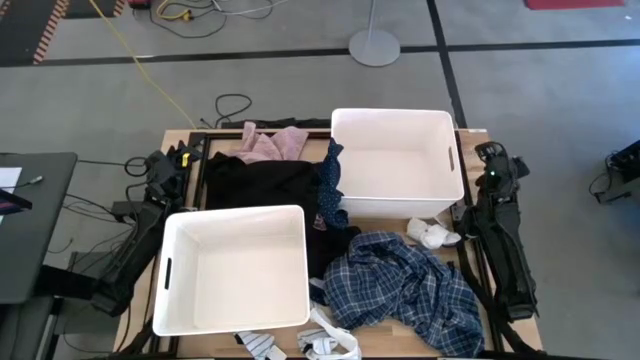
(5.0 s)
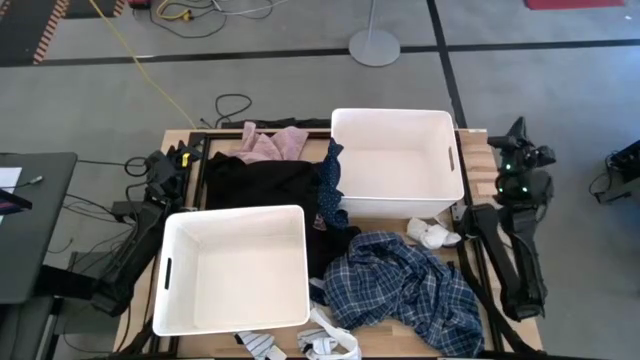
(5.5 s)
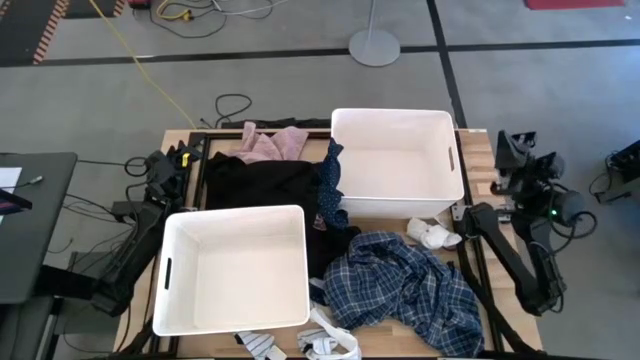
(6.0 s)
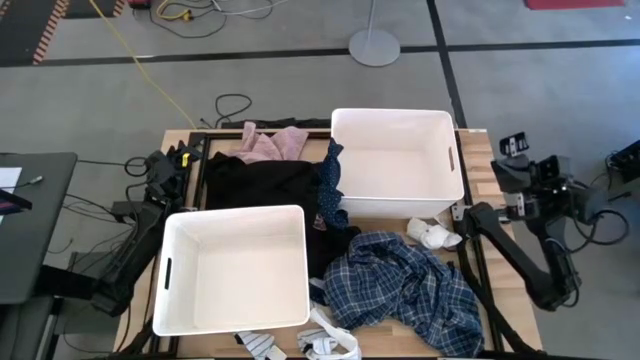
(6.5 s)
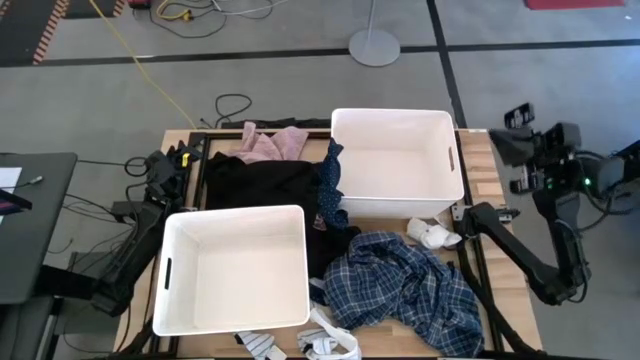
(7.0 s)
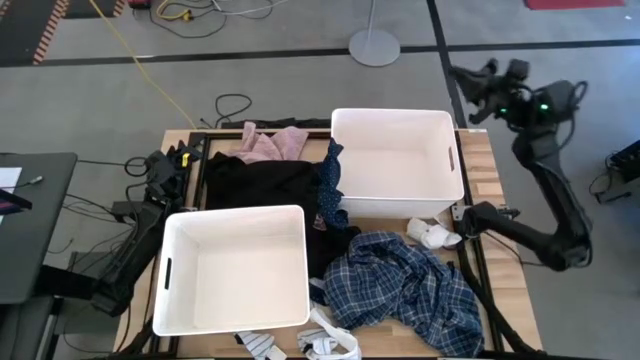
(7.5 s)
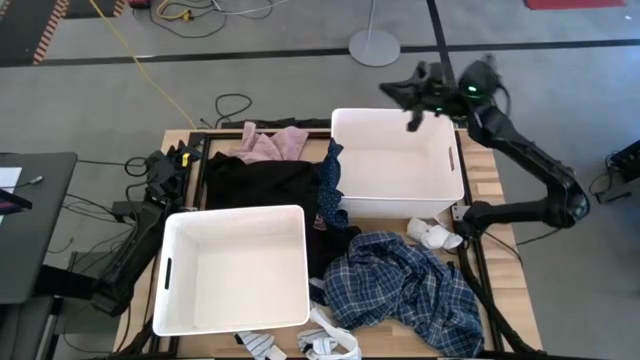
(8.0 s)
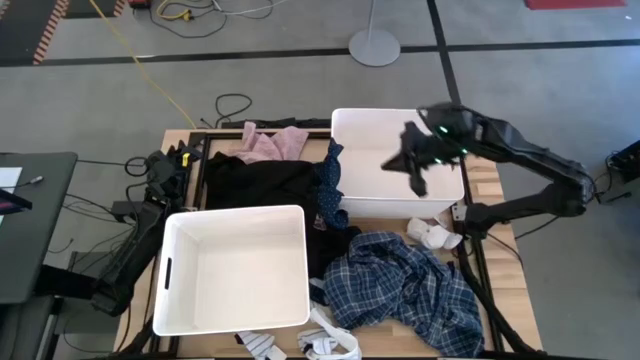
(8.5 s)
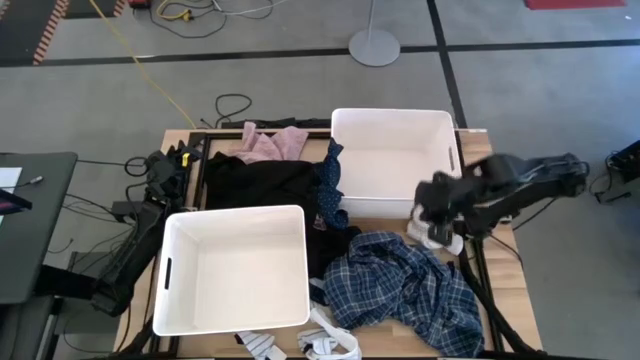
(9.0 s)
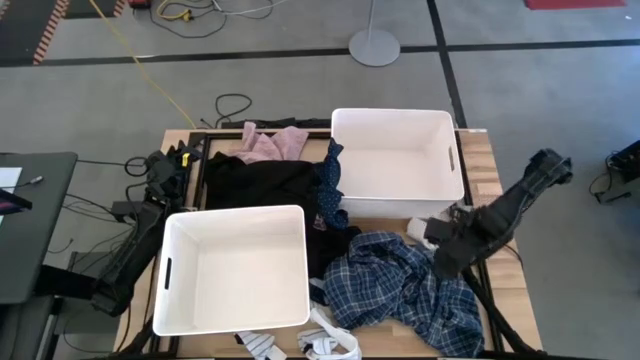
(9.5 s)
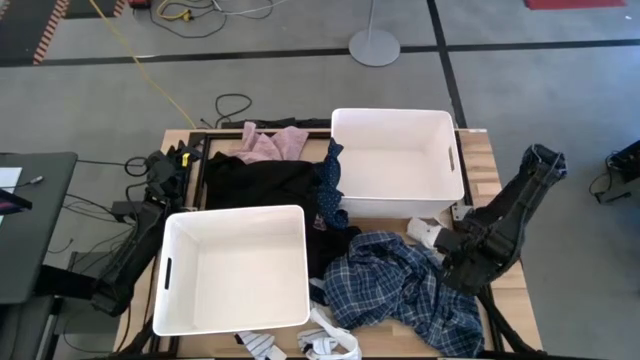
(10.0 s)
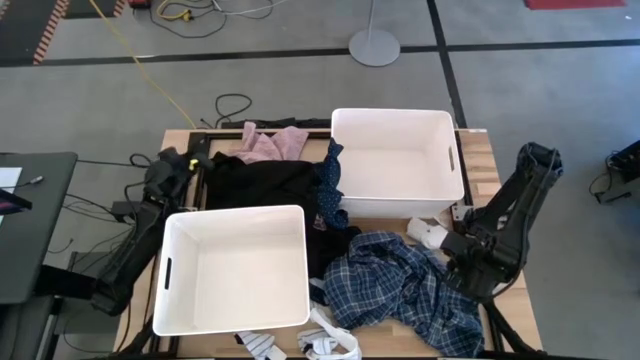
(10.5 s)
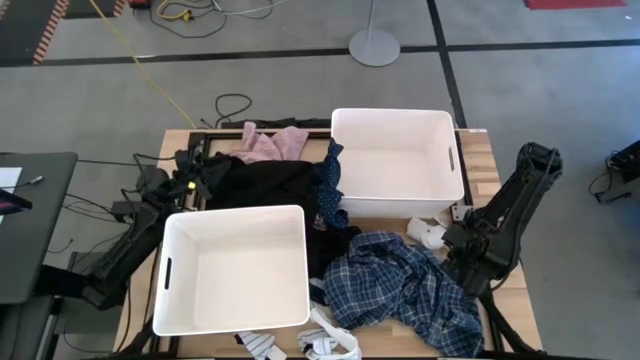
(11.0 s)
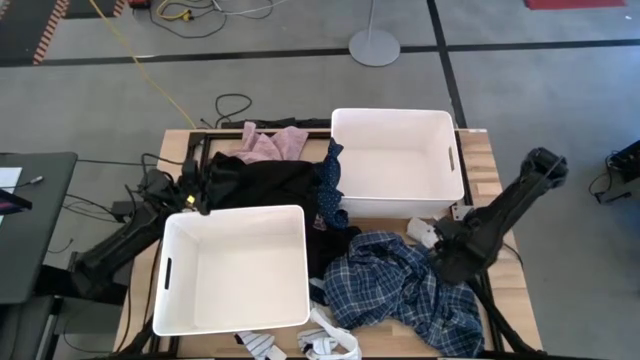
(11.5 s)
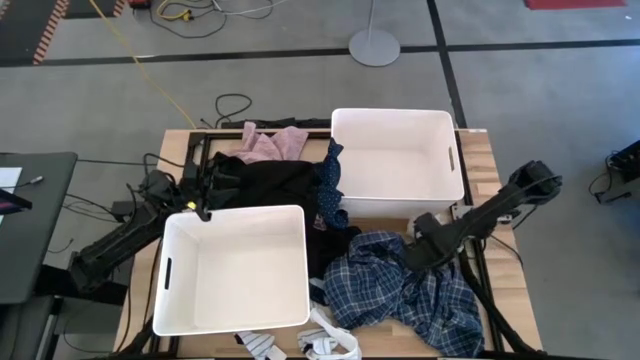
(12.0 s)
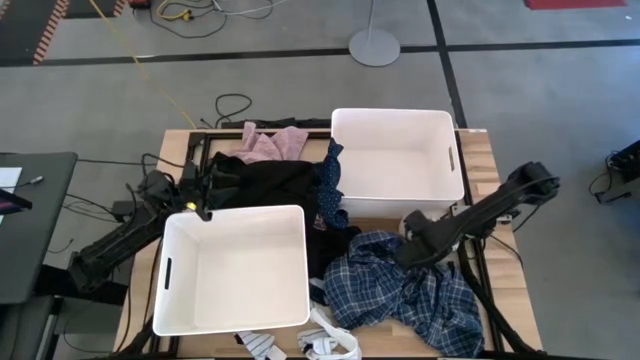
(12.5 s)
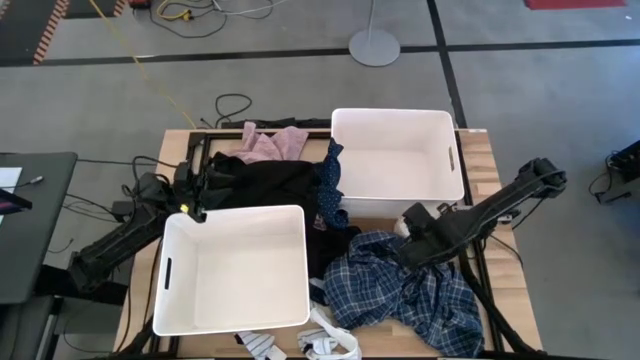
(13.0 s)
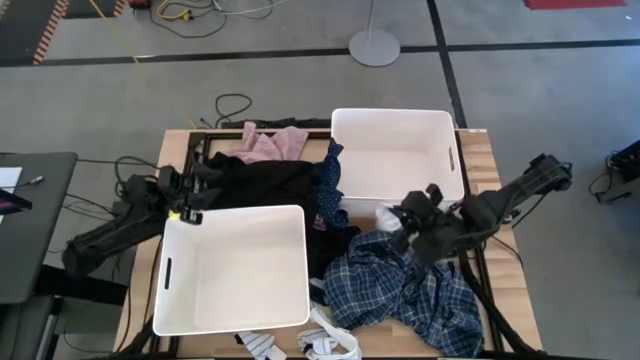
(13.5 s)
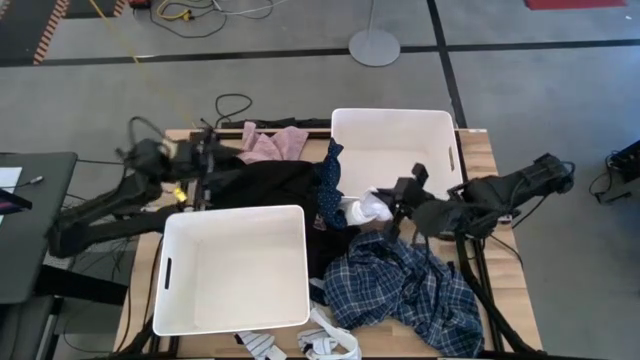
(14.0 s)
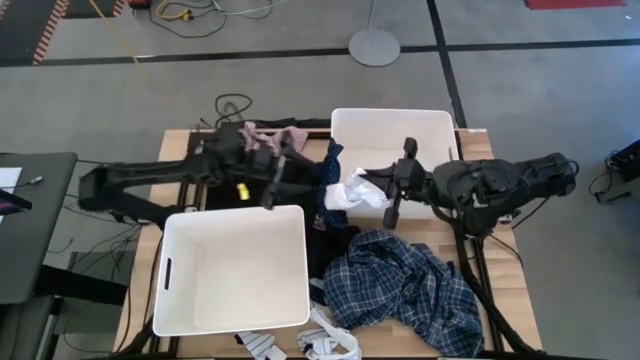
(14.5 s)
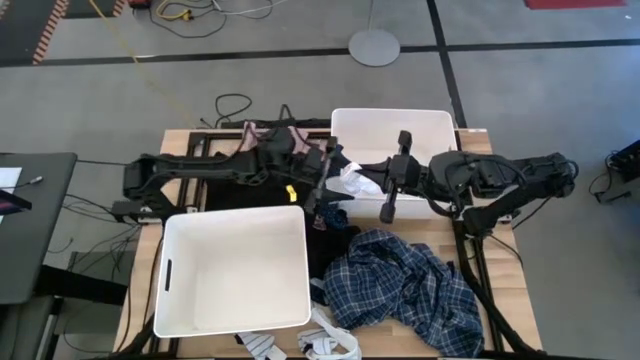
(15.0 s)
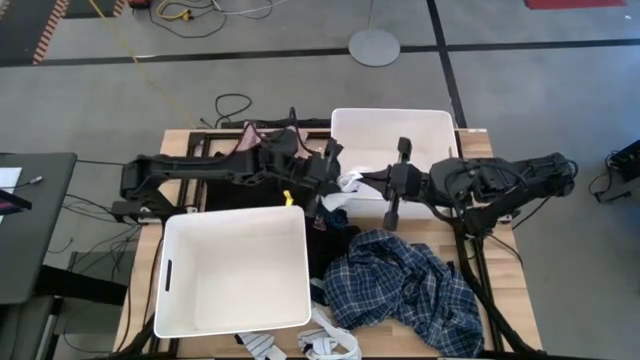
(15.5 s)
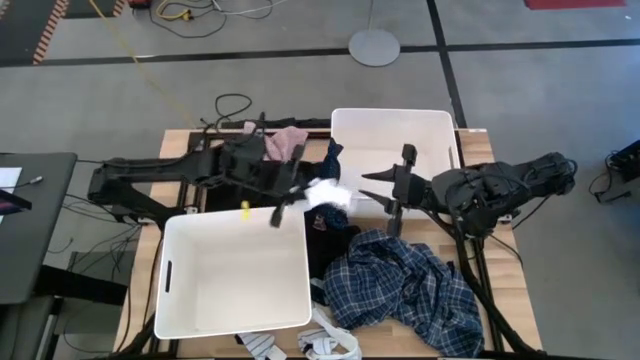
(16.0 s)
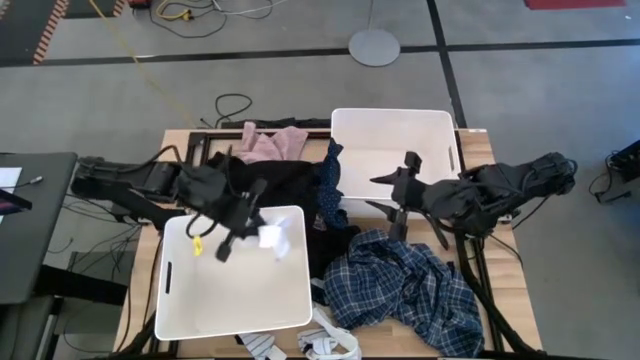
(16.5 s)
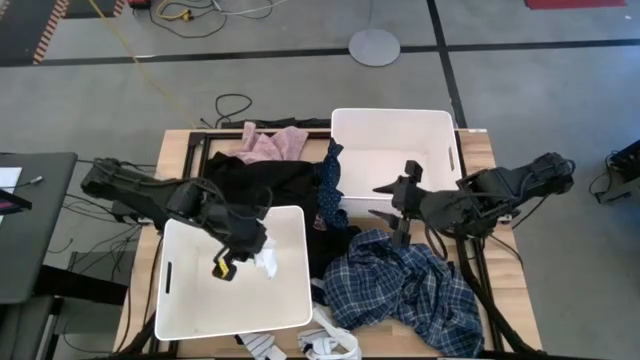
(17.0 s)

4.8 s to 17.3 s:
Task: Sort clothes
Put the white socks into the bottom laundry bin

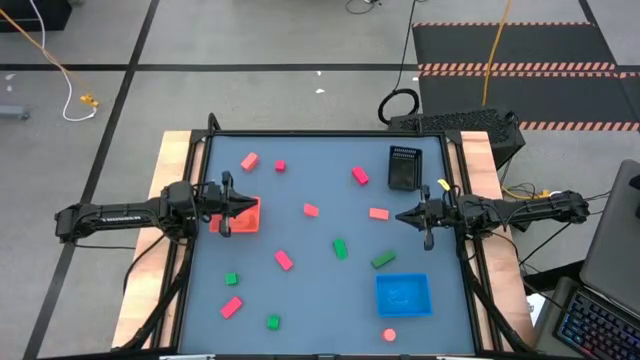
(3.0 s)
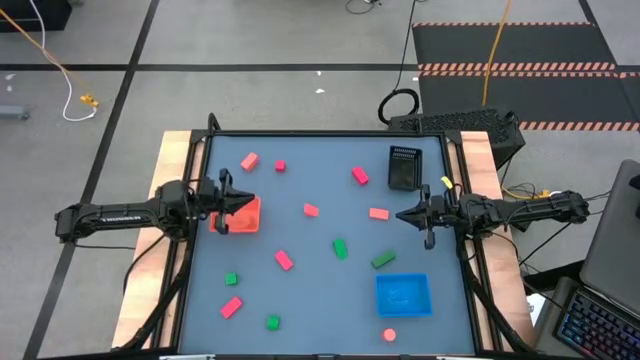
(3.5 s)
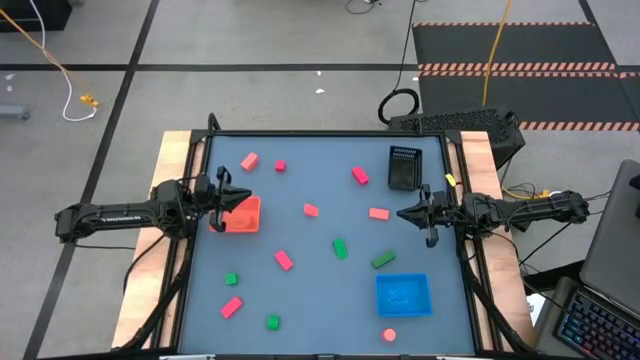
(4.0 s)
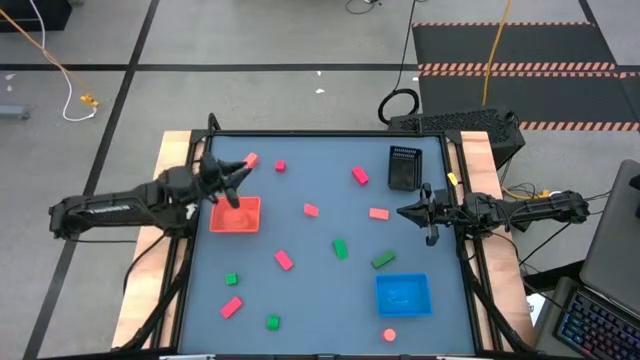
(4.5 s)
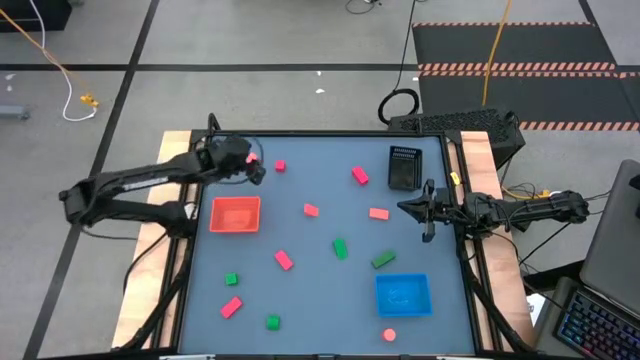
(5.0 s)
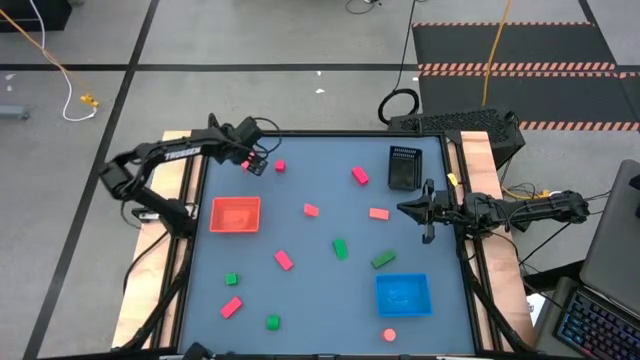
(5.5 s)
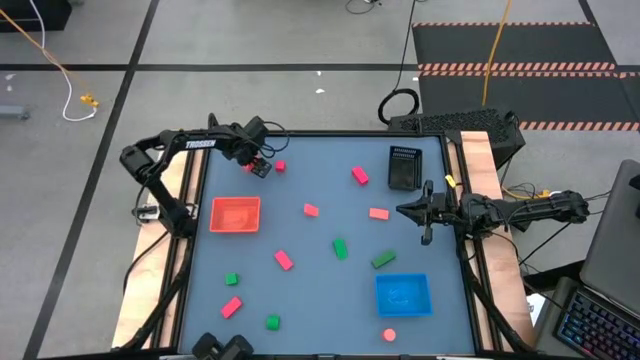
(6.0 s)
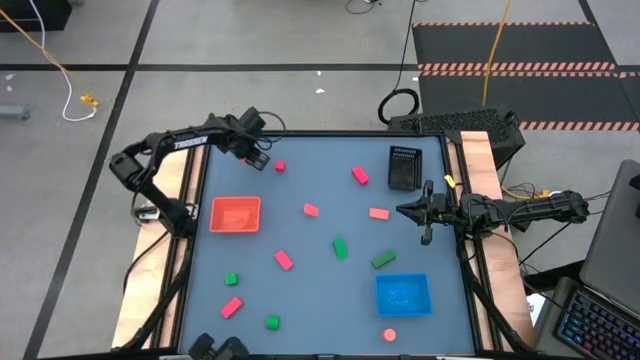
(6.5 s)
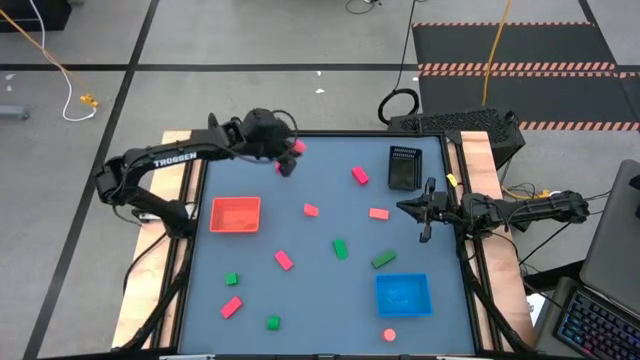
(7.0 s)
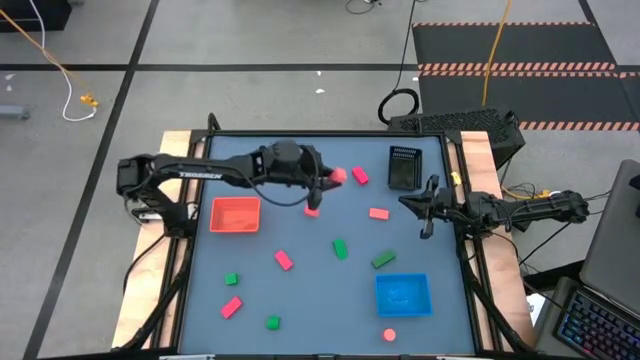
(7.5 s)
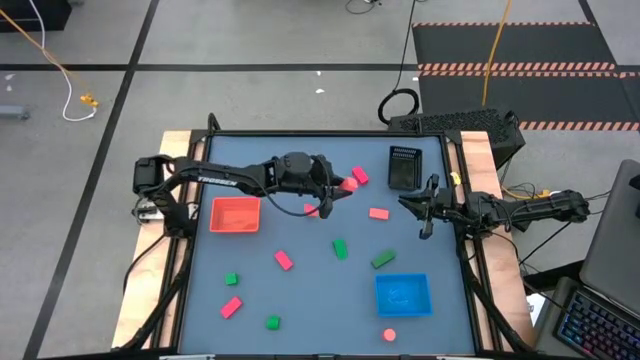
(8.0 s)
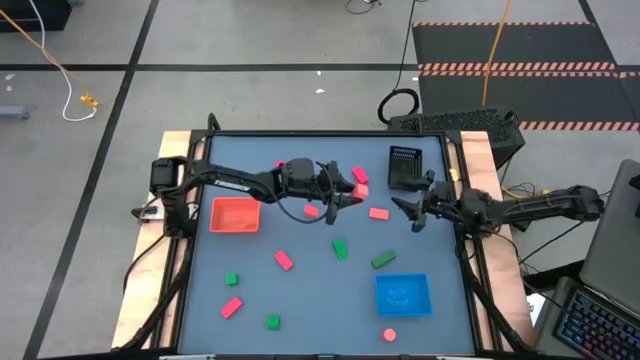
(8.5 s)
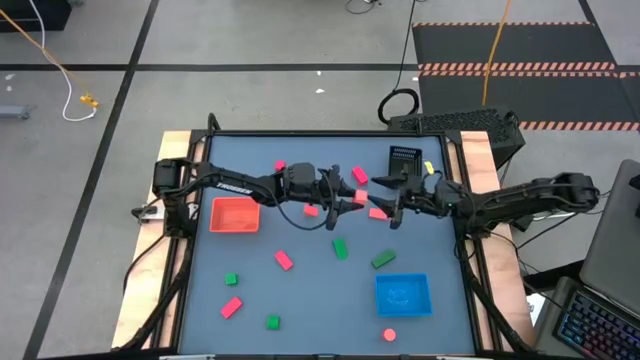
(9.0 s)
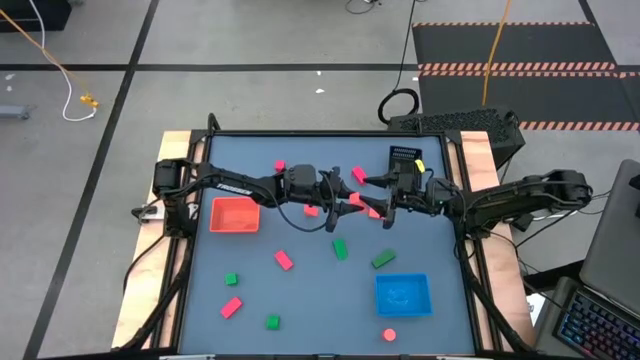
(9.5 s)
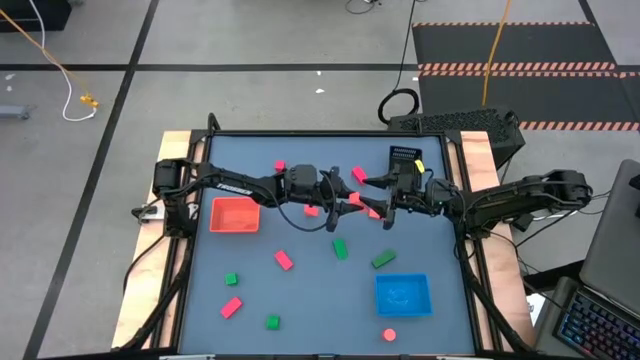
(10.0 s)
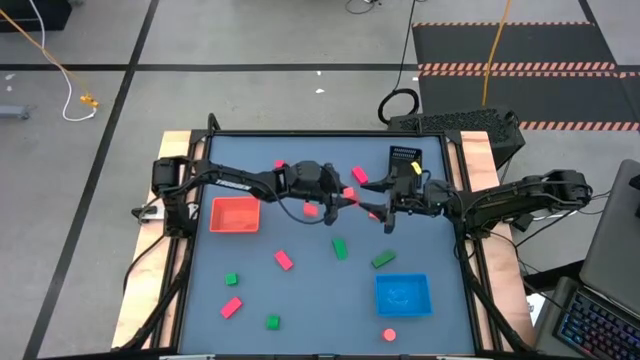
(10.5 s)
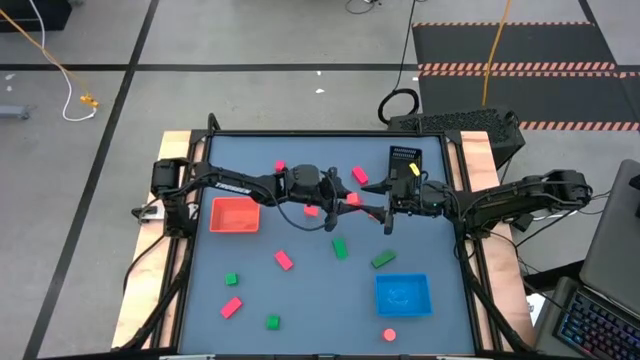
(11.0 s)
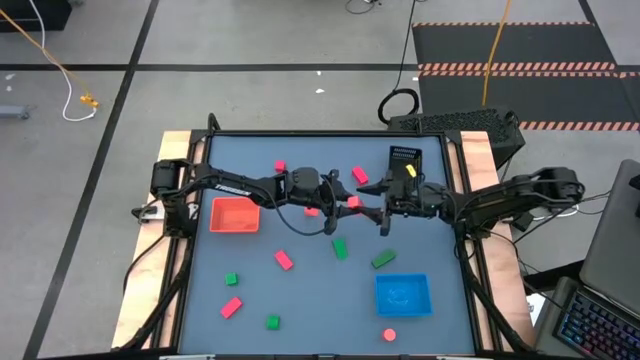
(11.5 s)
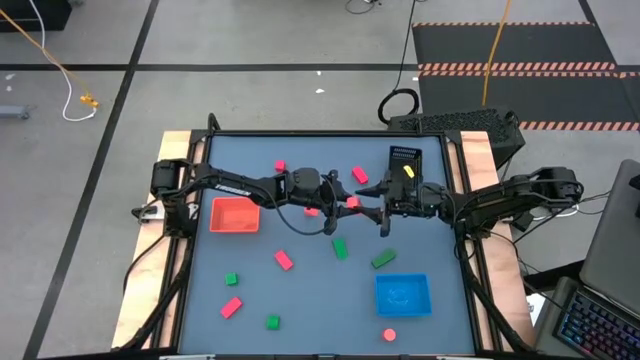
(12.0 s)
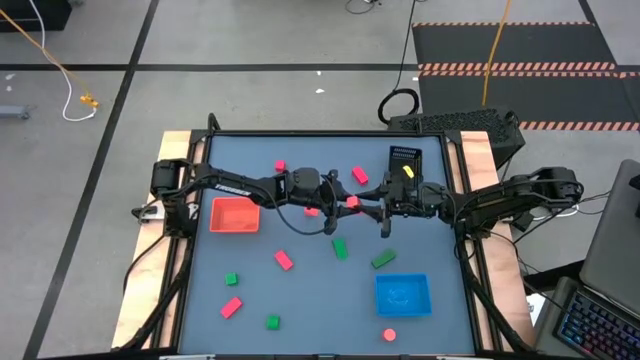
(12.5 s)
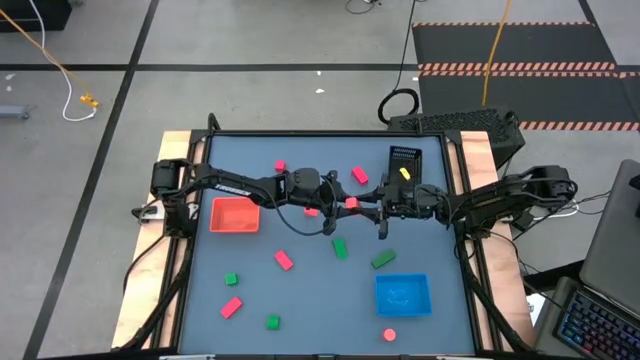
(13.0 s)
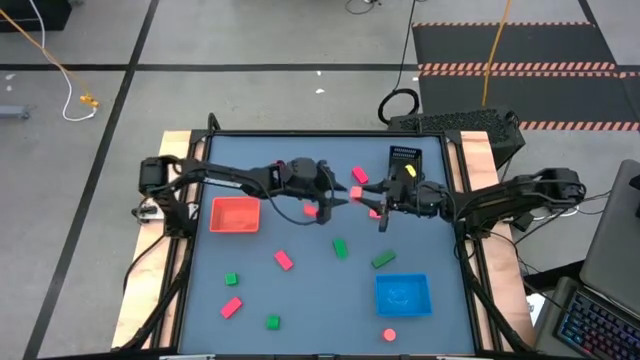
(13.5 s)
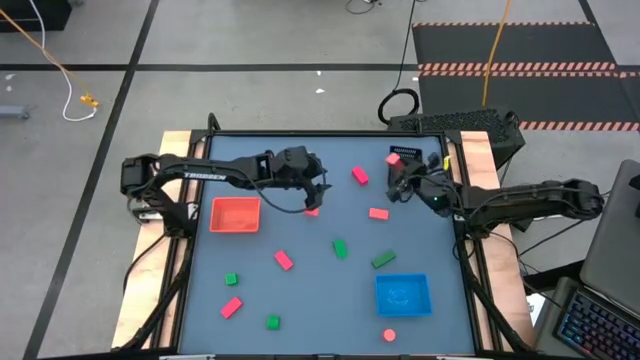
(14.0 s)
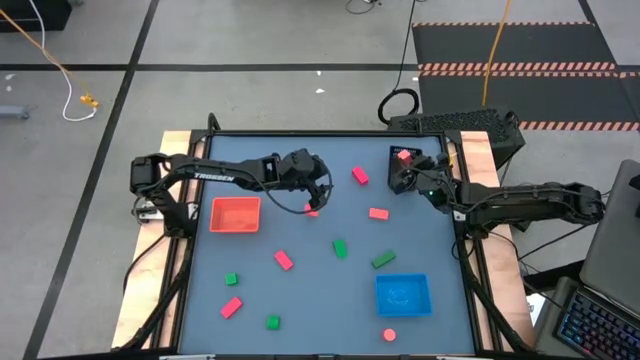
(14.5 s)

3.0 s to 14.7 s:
Task: Sort & place blocks by color
Put the orange block into the black bin
